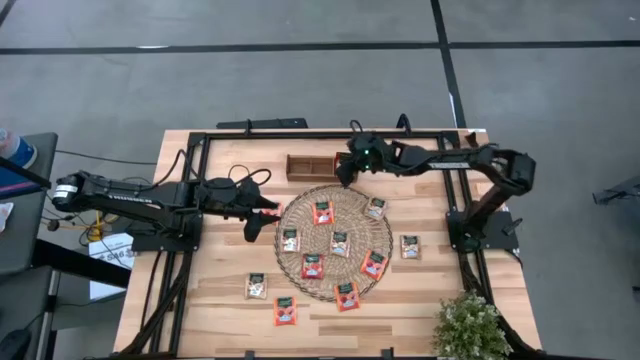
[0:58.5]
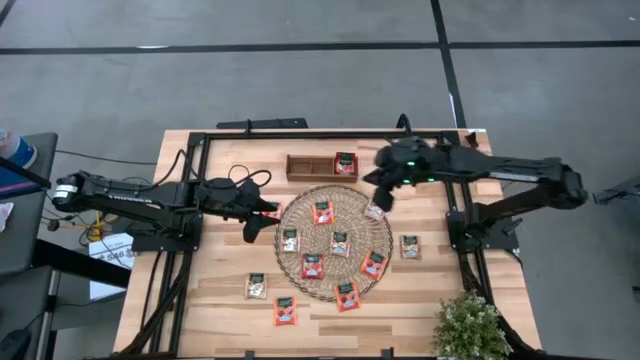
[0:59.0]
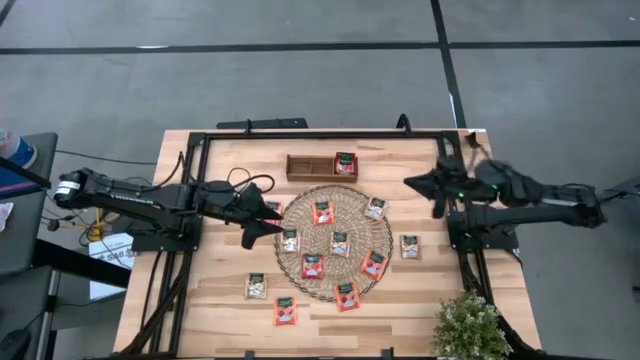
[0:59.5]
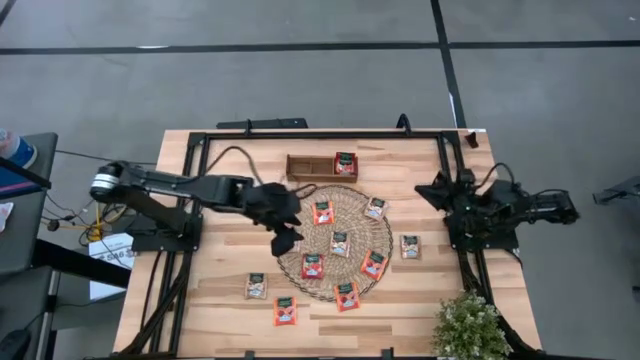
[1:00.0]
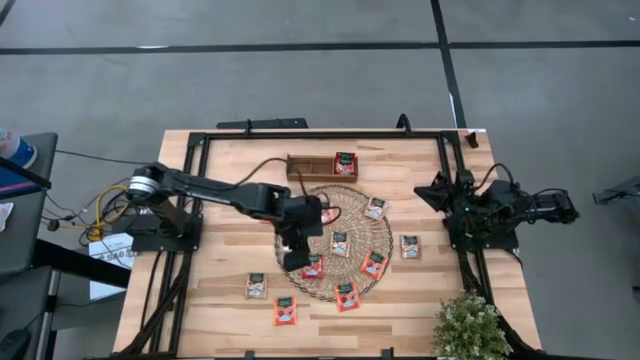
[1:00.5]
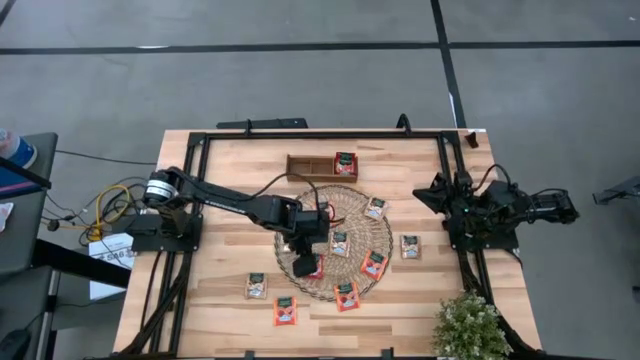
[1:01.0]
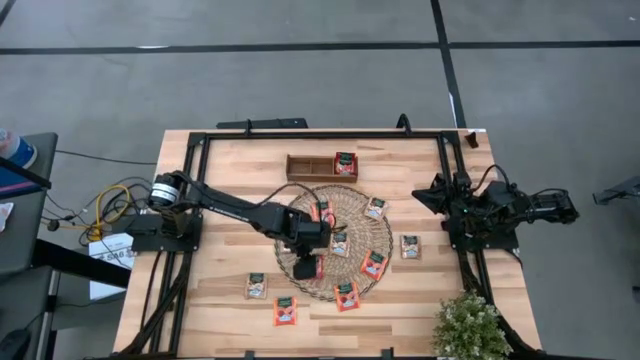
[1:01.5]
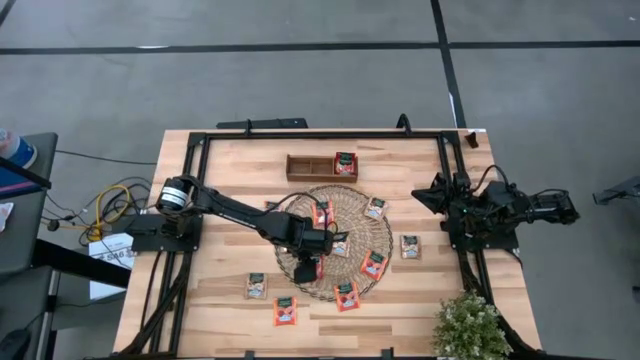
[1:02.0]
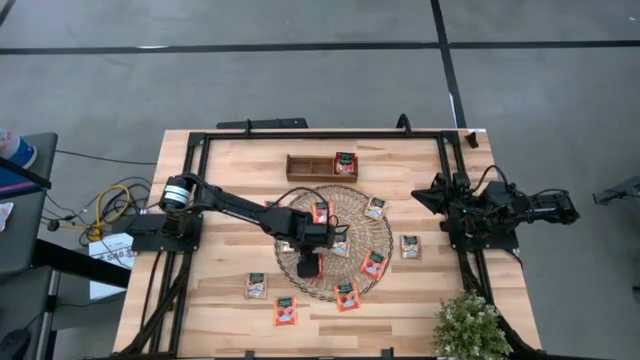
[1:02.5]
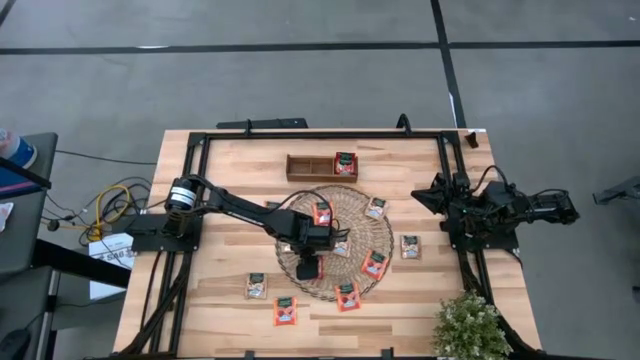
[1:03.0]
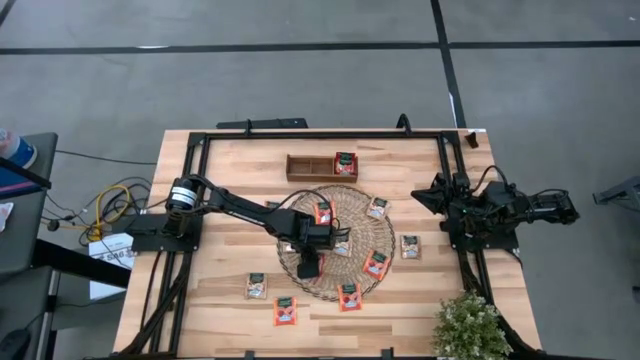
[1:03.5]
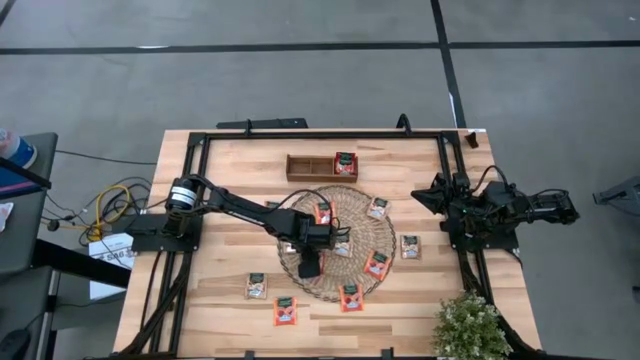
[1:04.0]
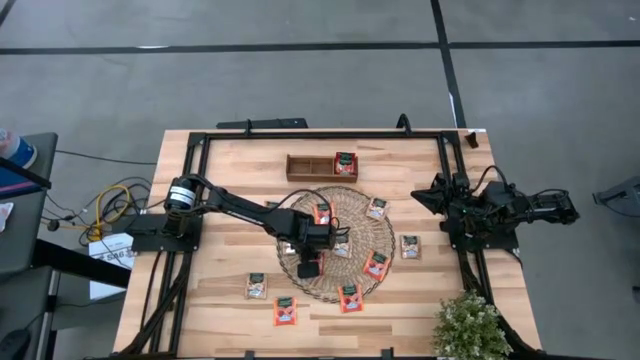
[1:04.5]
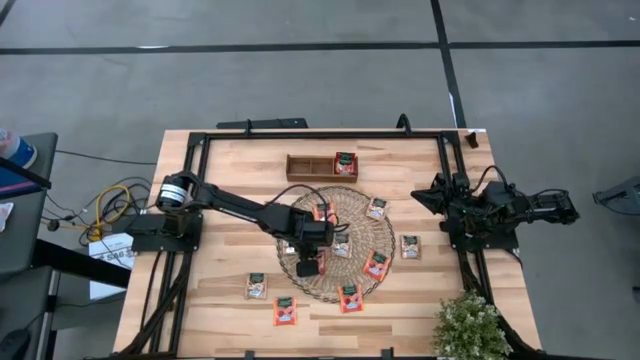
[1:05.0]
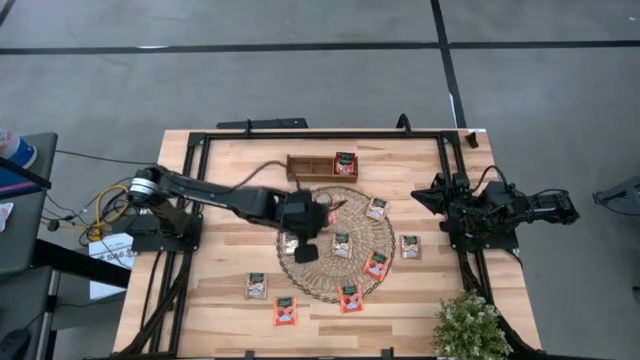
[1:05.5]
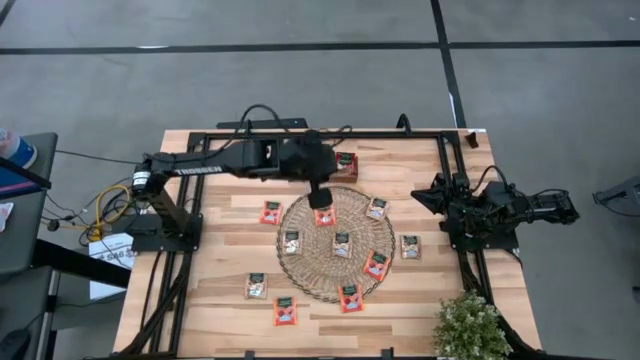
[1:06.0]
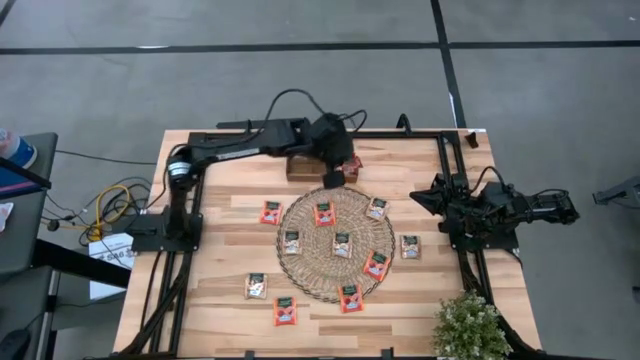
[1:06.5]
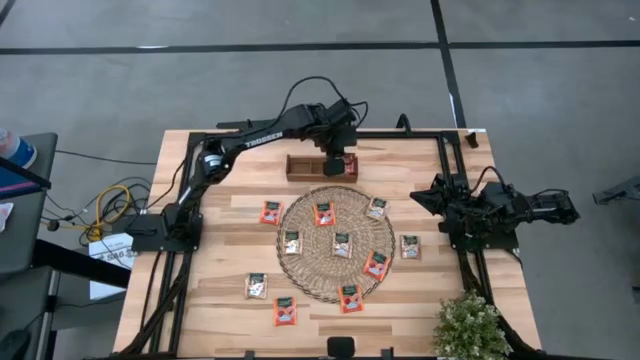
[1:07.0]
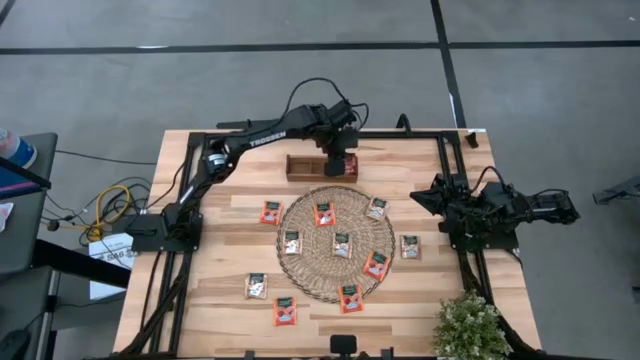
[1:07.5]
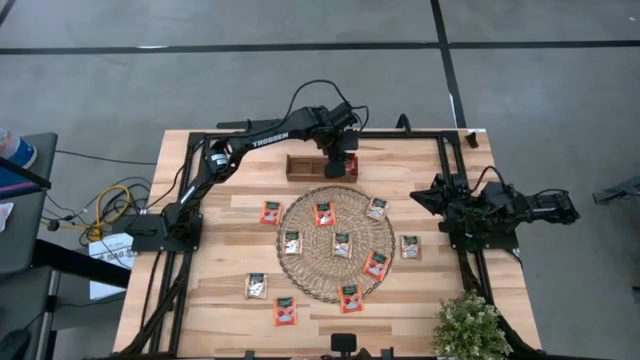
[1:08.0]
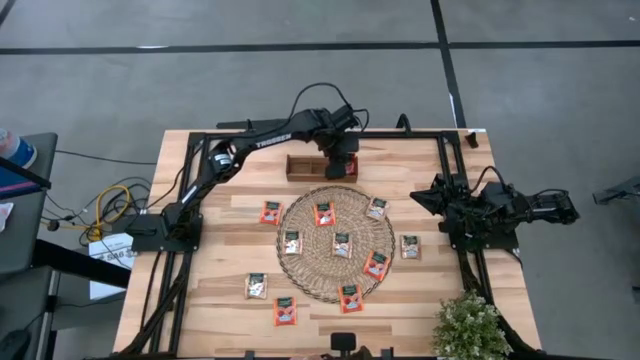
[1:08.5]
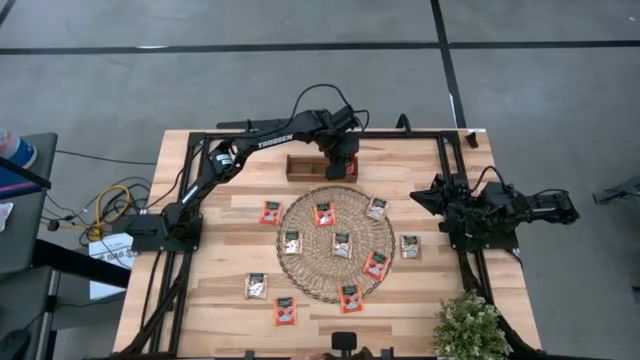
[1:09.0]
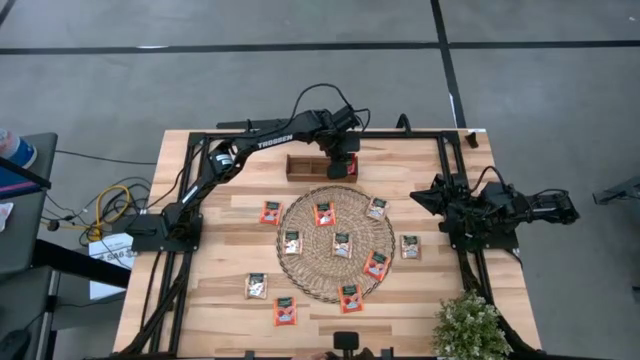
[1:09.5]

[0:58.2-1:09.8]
Task: Pick & Place Tea
Put the red tea bag into the right section of the brown wooden organizer

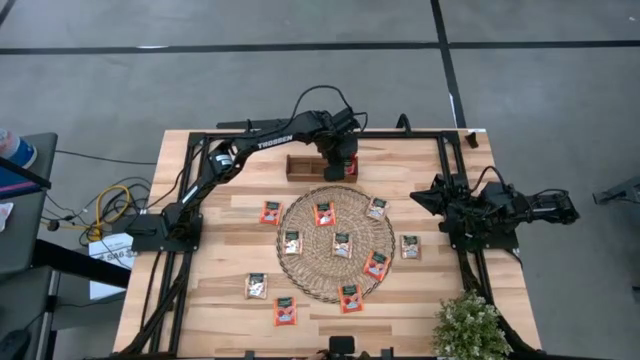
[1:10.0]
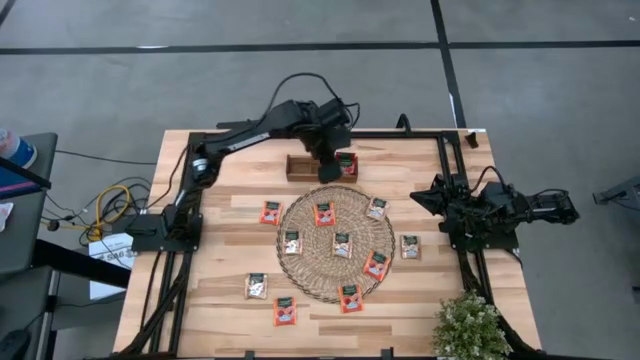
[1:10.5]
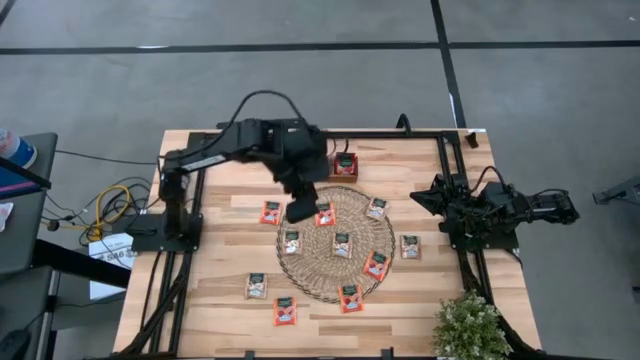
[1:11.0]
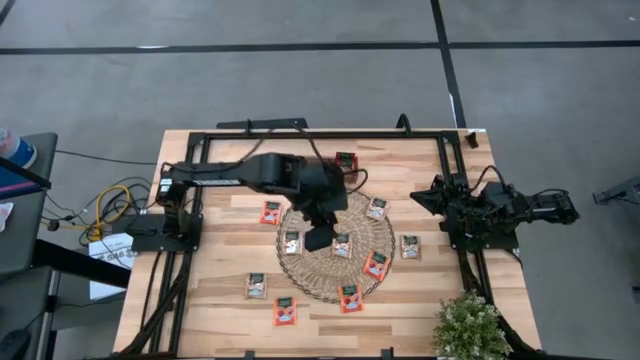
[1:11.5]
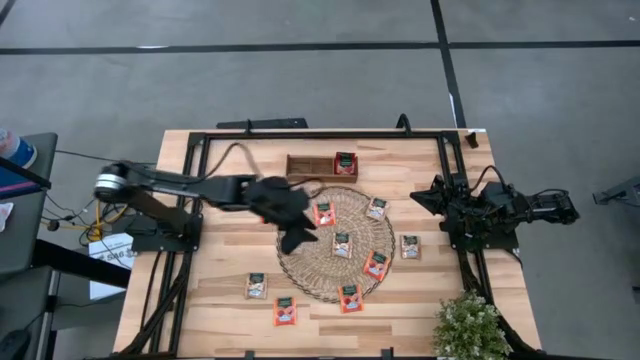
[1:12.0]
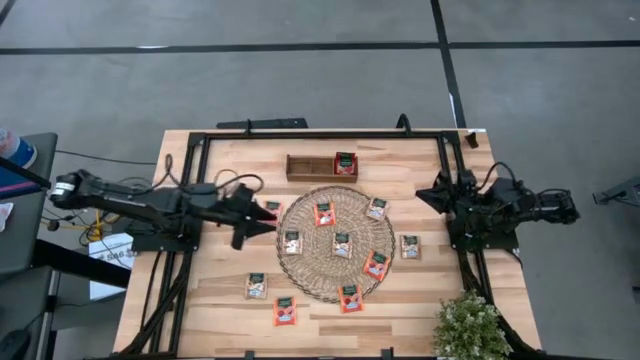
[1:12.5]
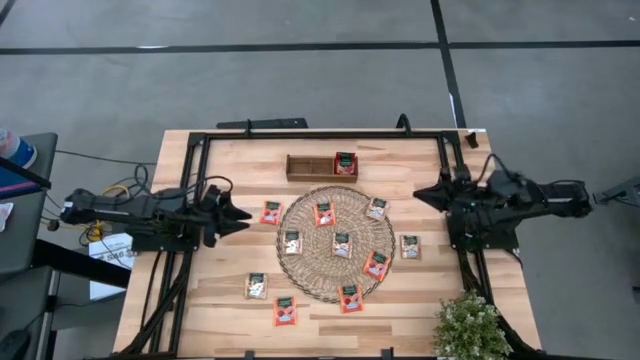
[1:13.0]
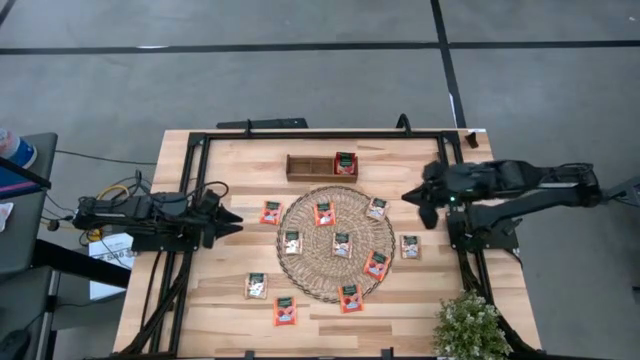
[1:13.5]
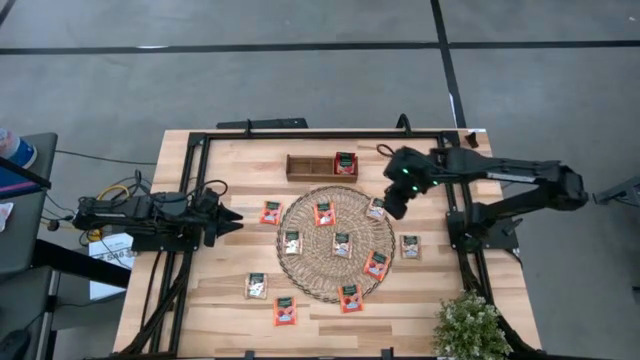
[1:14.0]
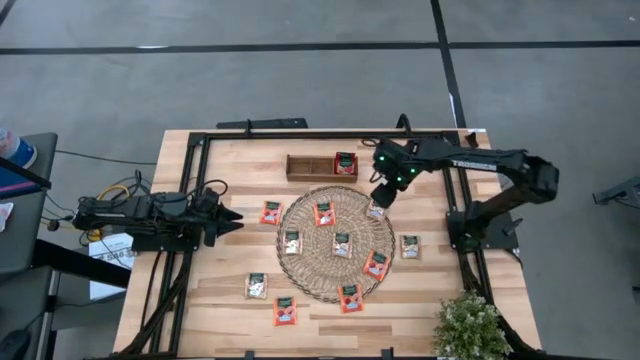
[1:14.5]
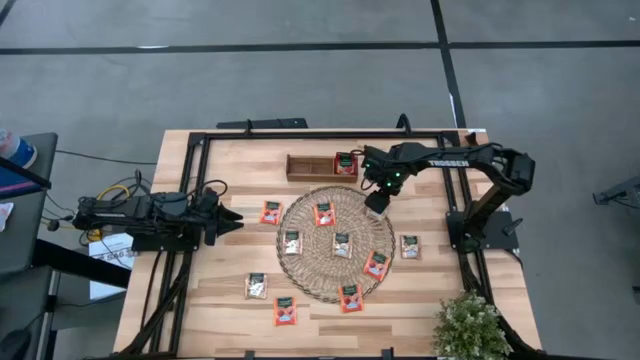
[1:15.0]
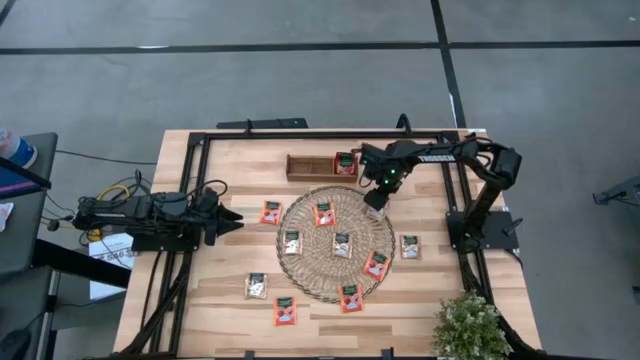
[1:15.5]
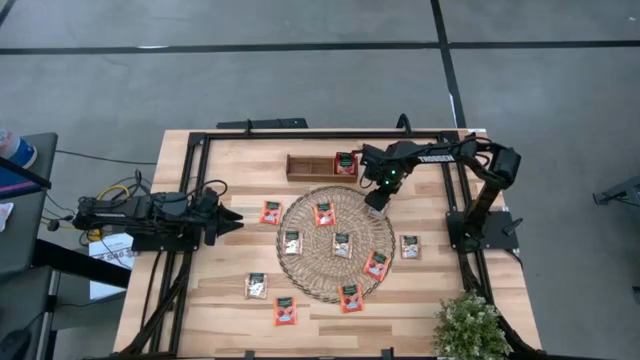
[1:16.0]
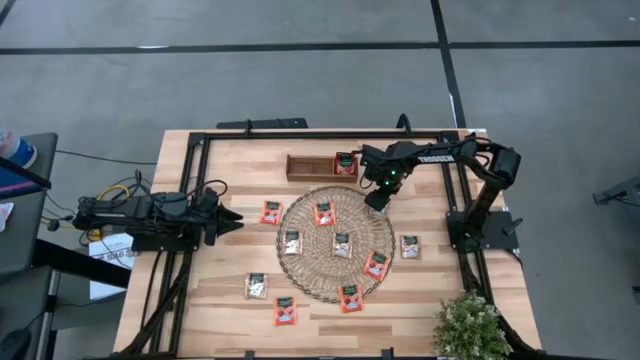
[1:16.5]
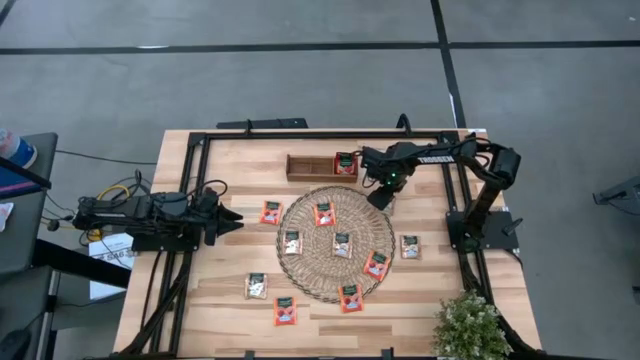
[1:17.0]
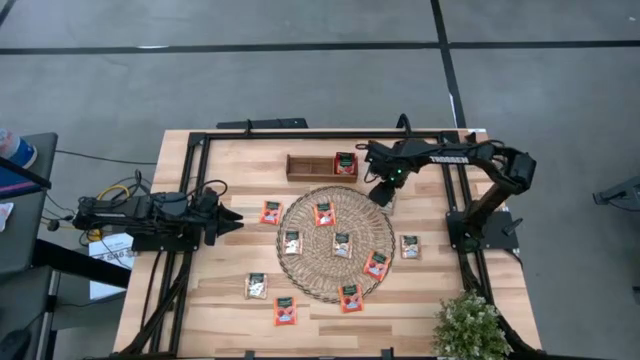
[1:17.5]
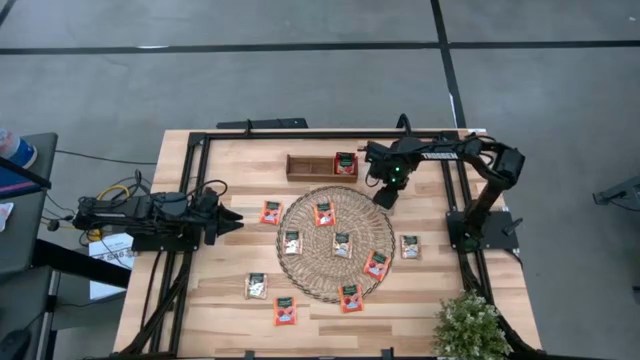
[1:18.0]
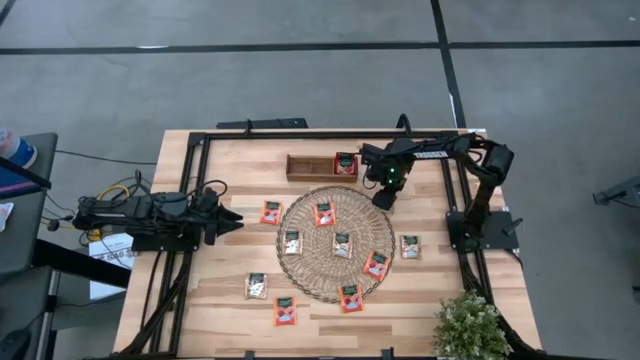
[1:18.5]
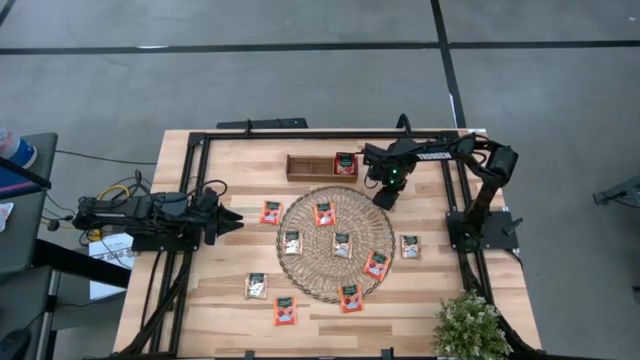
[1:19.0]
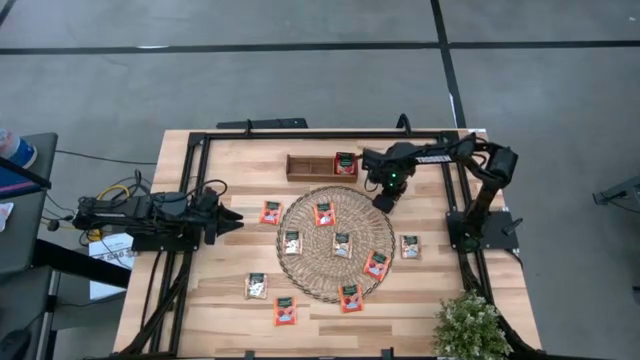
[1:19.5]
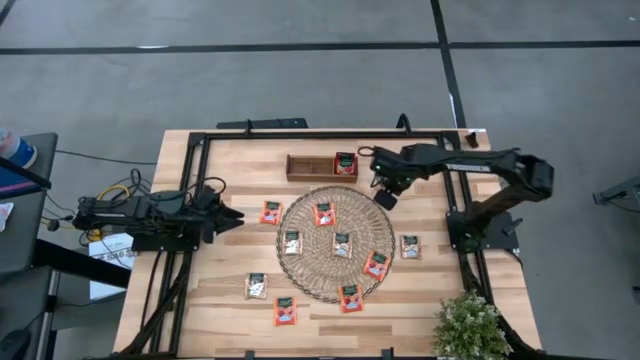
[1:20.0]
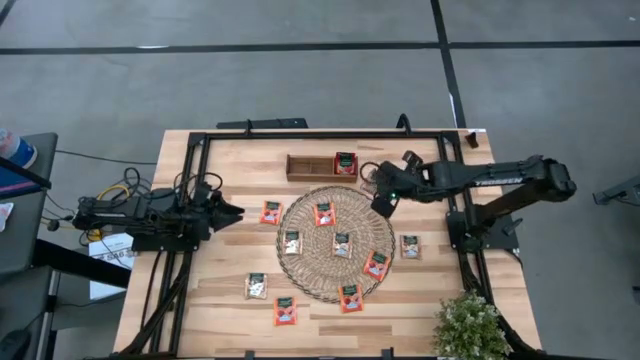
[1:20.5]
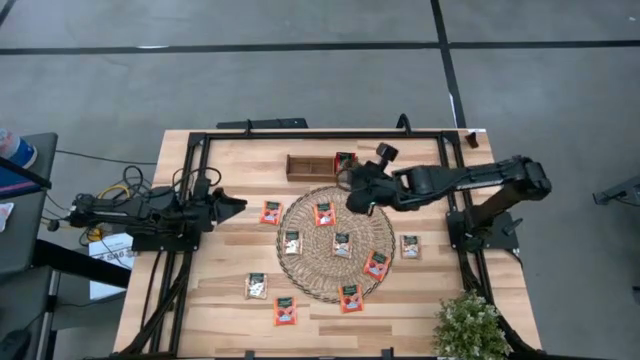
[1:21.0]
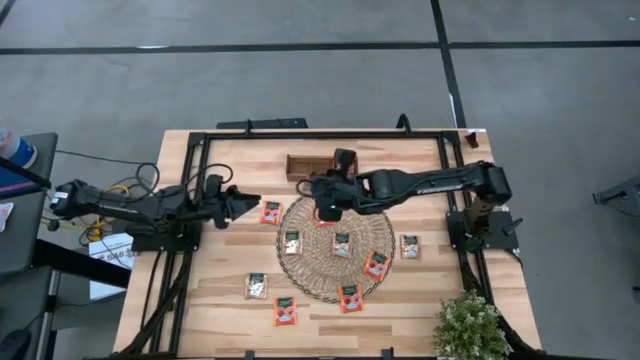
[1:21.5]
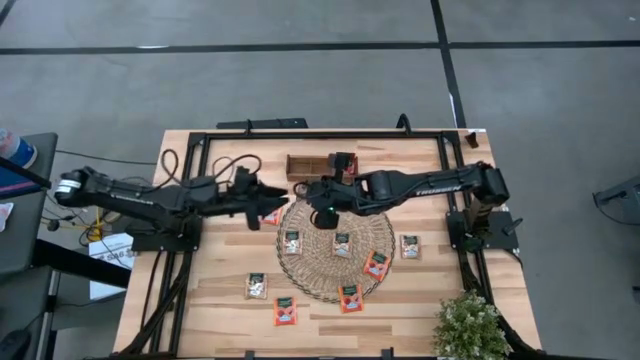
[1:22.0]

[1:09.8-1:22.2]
Put the brown tea bag into the middle section of the brown wooden organizer
